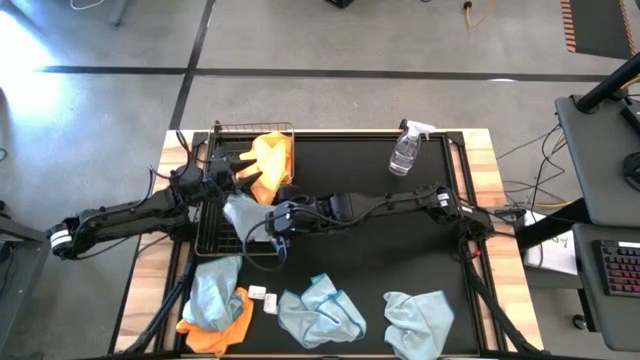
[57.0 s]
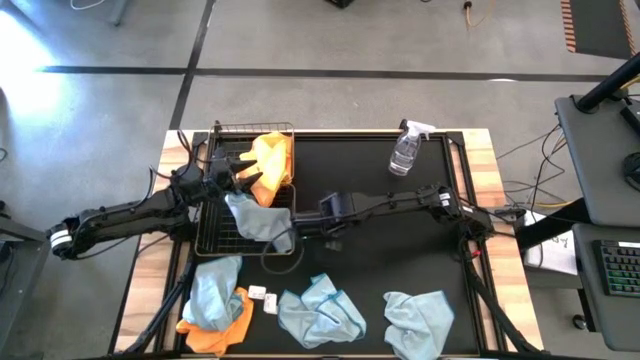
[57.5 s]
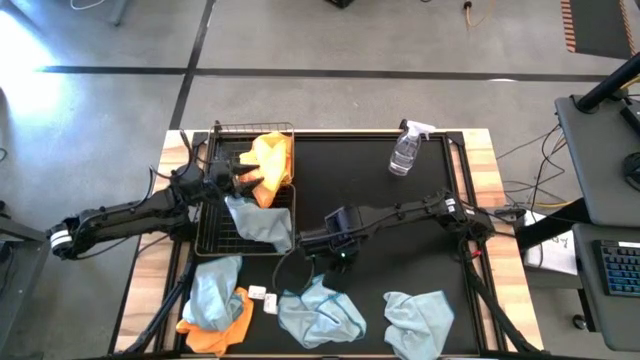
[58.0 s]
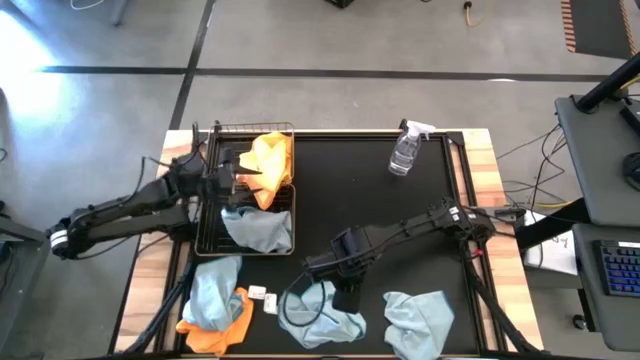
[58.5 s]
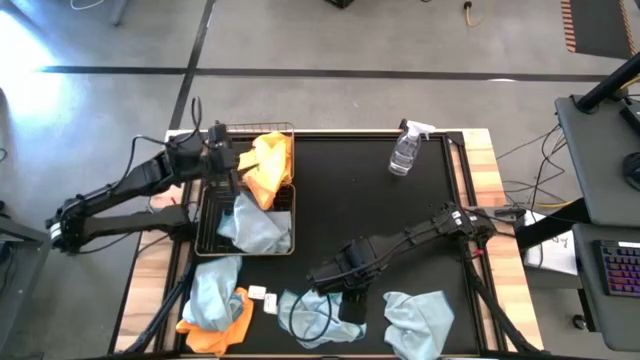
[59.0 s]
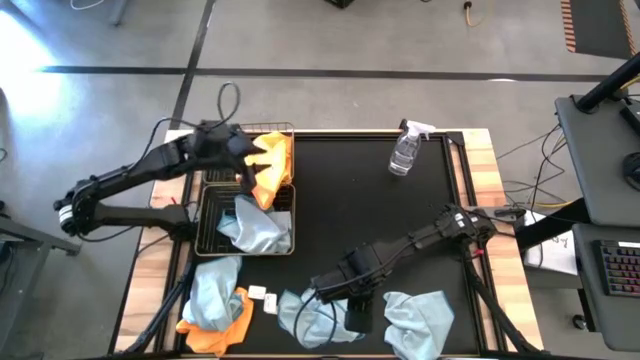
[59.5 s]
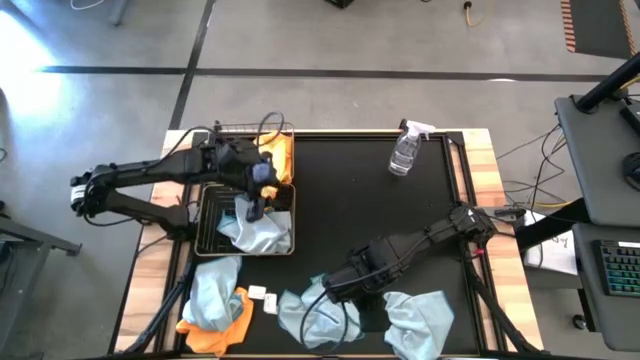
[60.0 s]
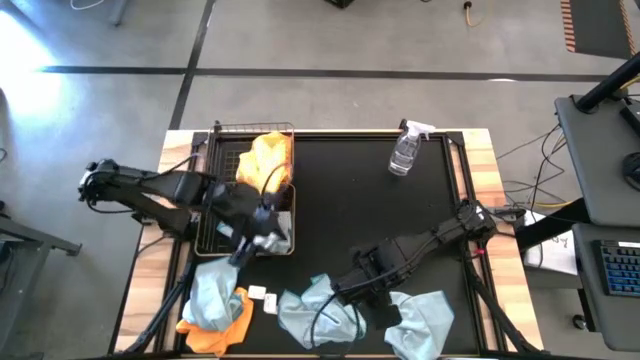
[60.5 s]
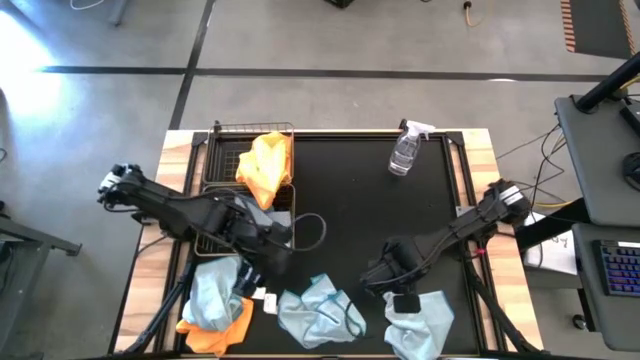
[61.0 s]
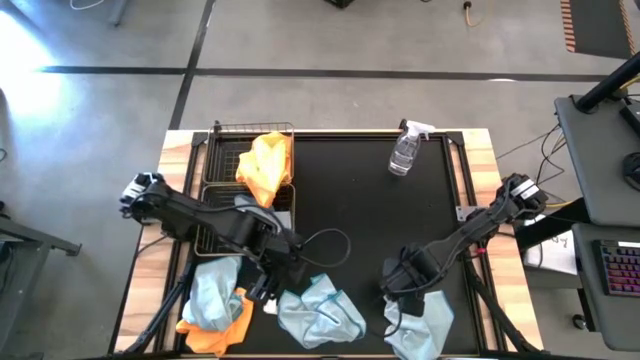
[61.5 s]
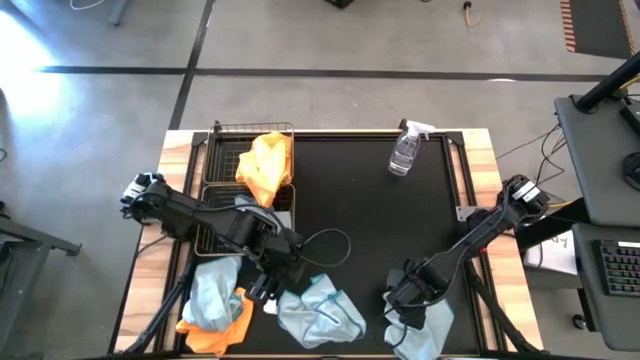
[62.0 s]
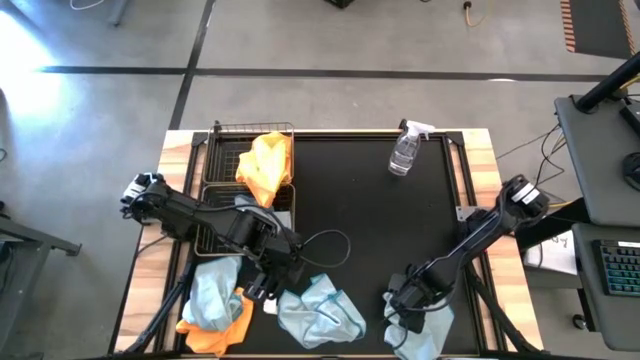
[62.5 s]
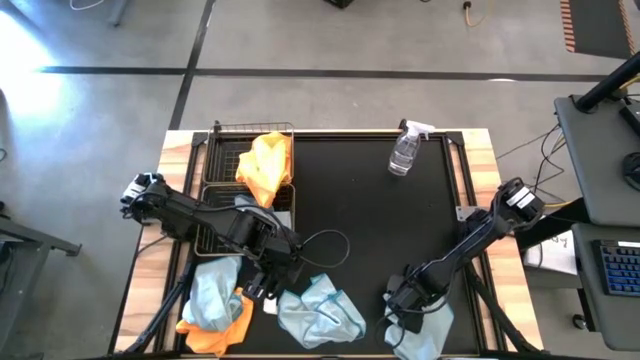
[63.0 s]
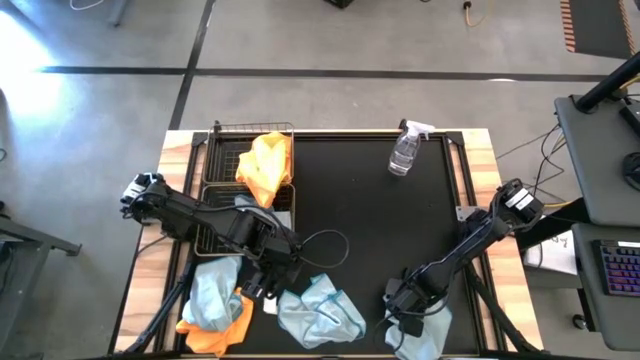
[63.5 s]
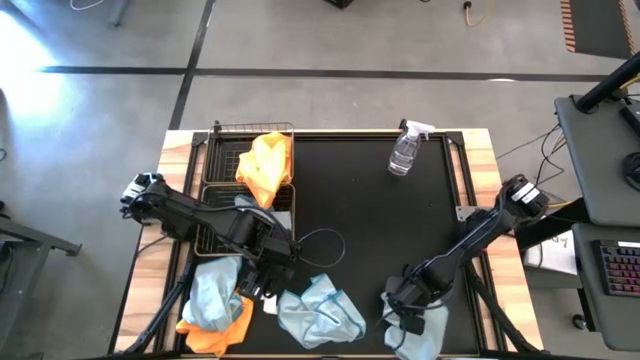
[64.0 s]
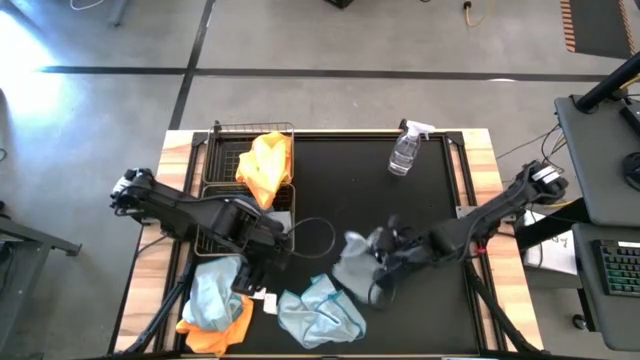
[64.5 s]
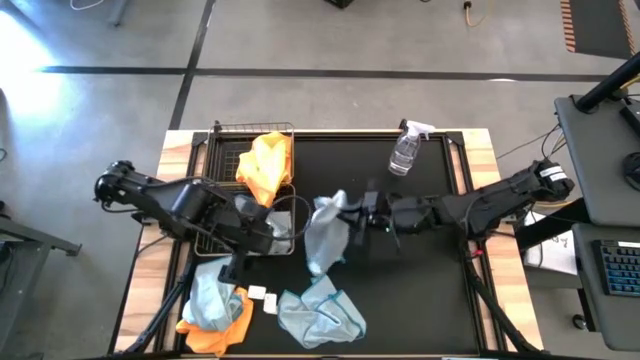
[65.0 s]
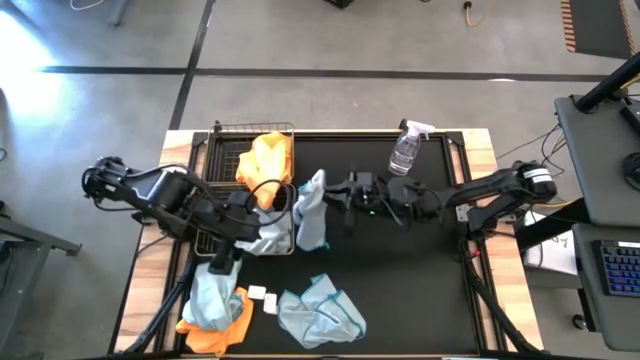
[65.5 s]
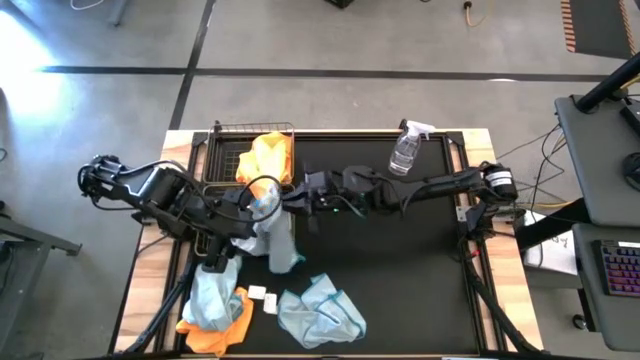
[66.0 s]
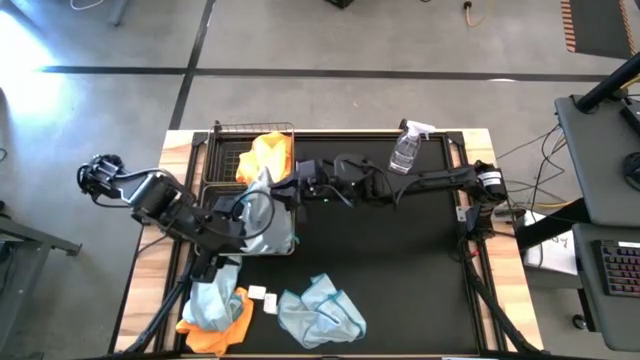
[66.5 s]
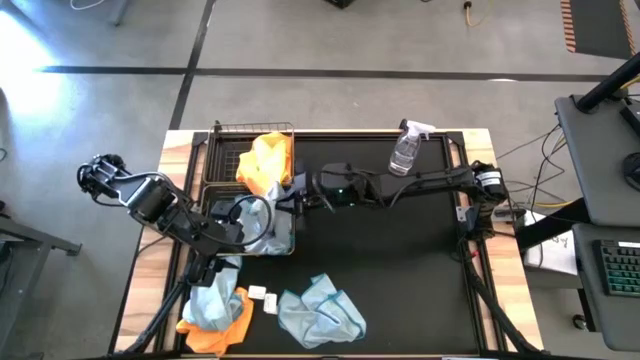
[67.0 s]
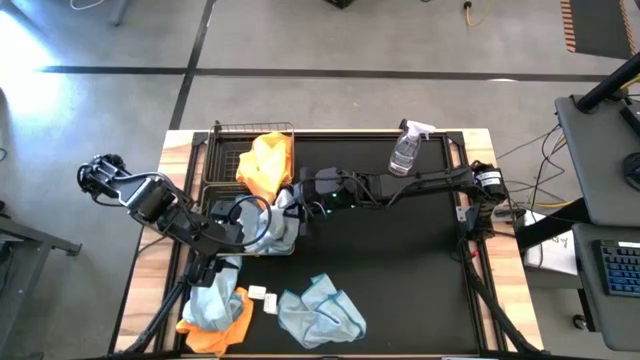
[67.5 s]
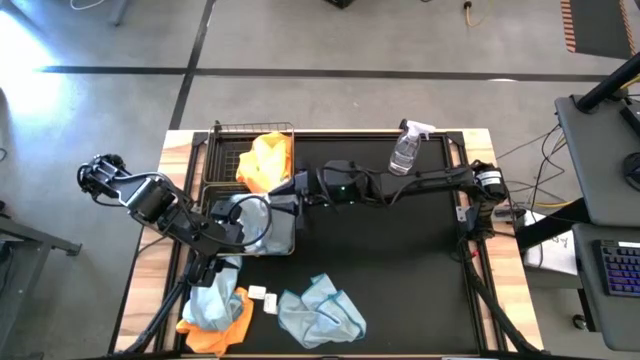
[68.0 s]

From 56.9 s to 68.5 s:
Task: Sort microfiber towel by color & place in baskets
Put the right blue microfiber towel into the bottom wire basket

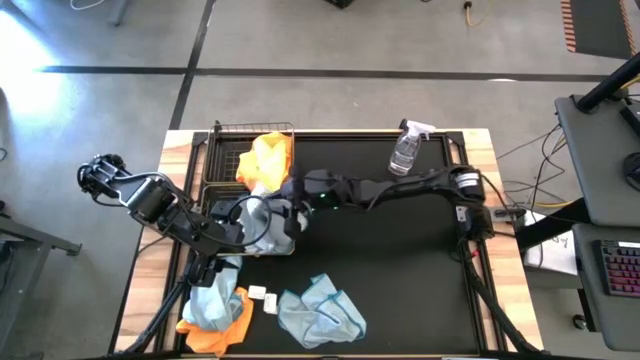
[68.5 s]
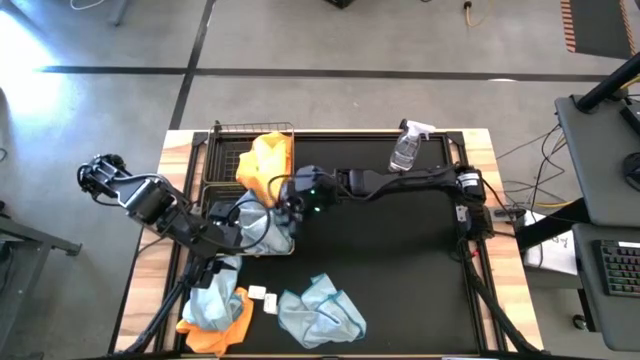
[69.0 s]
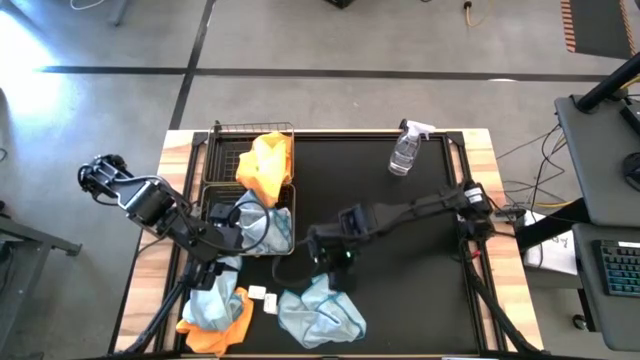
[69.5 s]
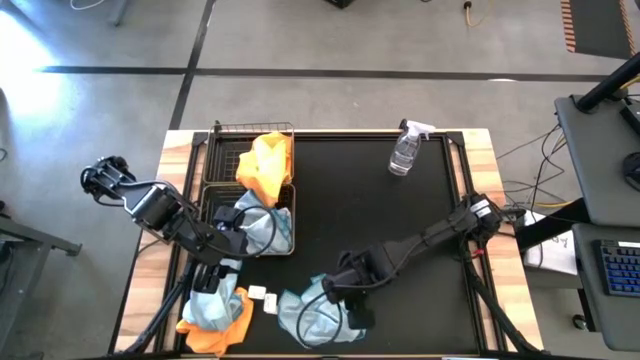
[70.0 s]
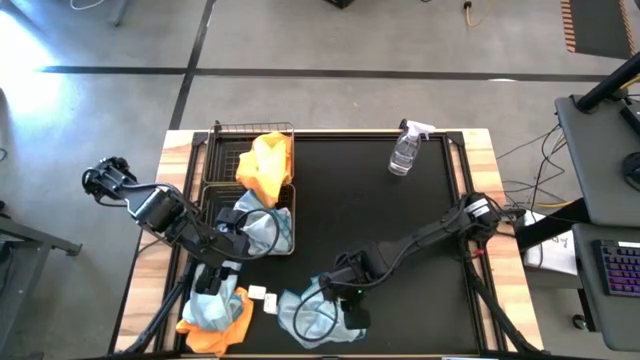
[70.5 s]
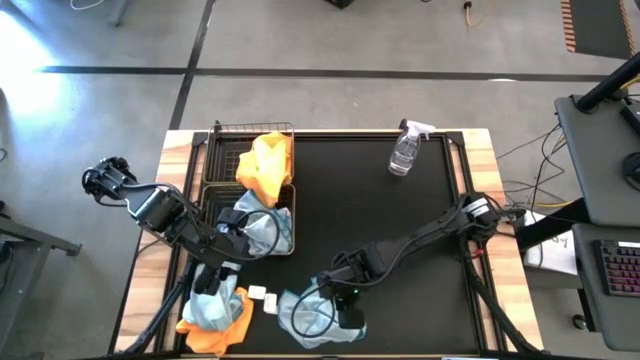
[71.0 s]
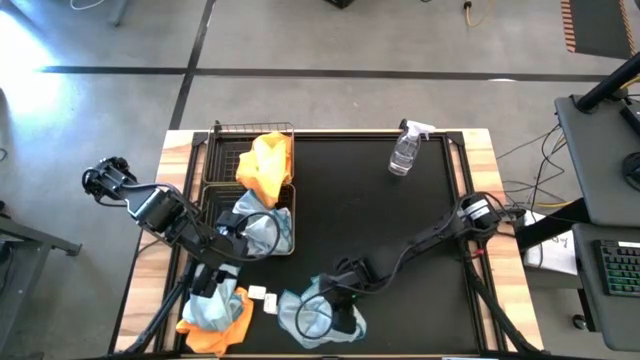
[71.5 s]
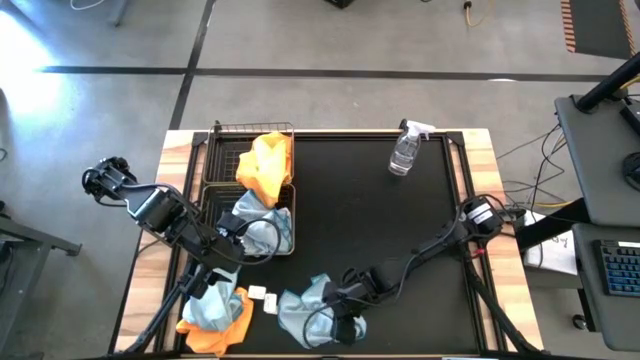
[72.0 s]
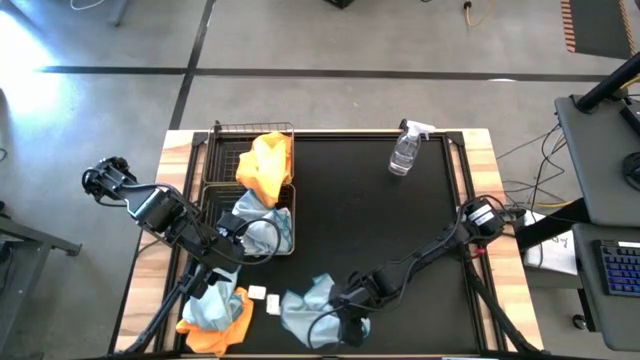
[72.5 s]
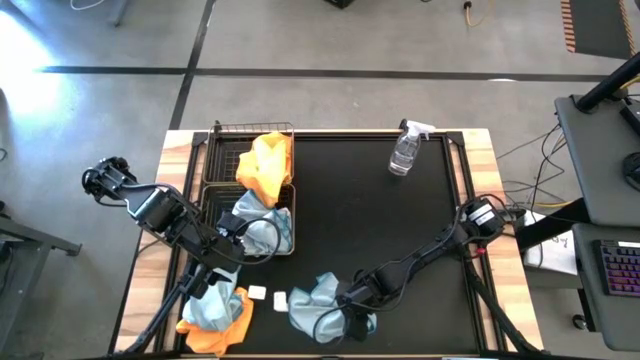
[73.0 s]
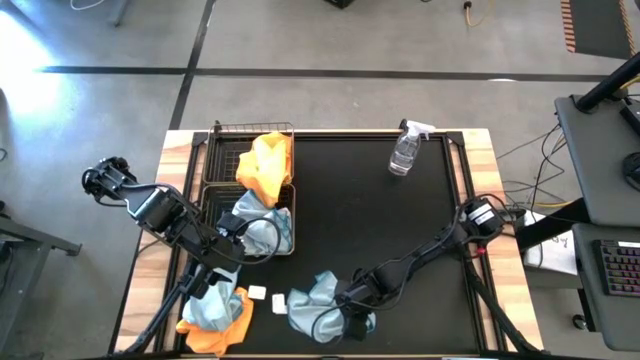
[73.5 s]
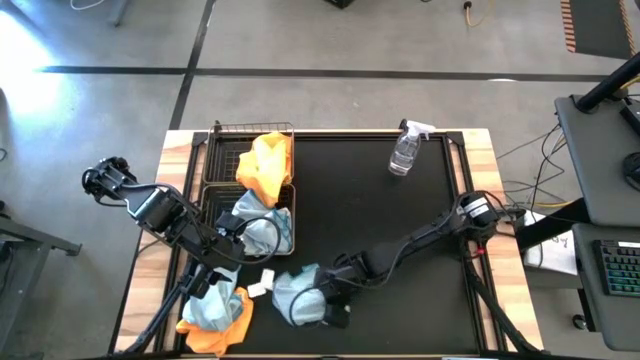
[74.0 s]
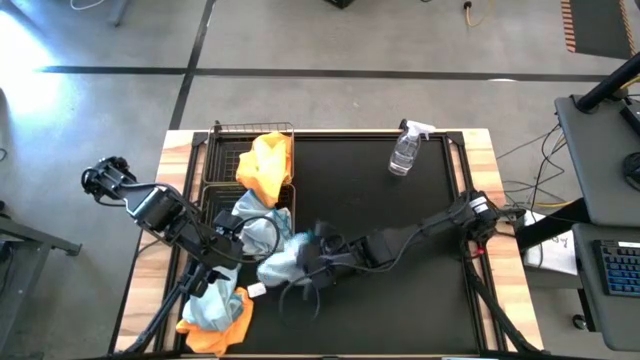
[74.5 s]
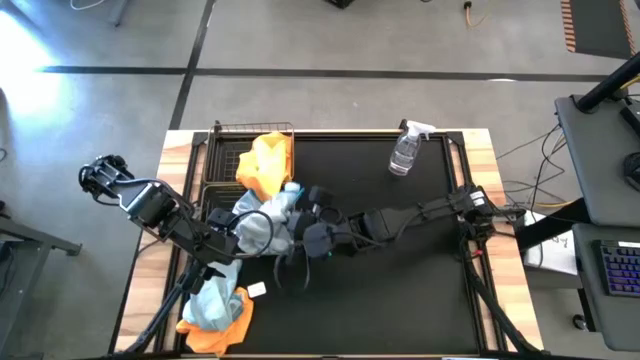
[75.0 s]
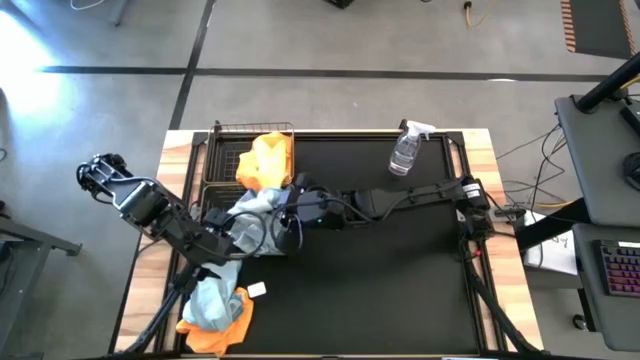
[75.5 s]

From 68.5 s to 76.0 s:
Put the right blue microfiber towel into the bottom wire basket

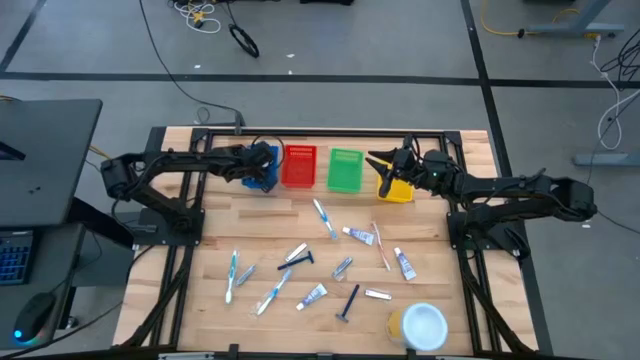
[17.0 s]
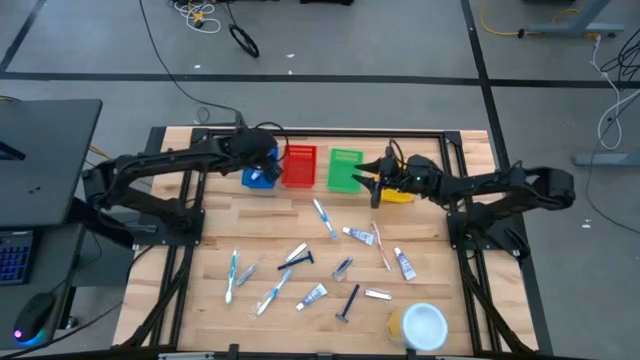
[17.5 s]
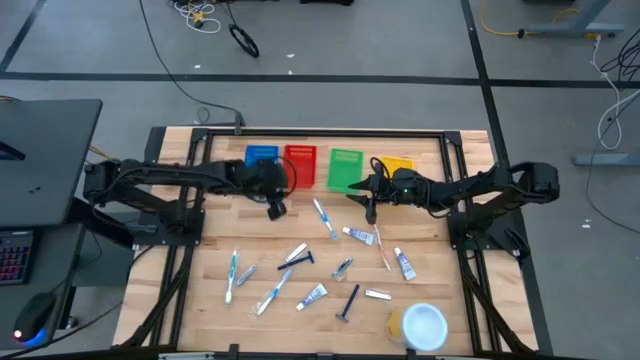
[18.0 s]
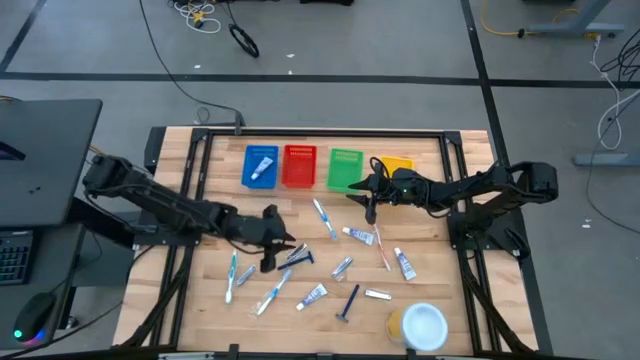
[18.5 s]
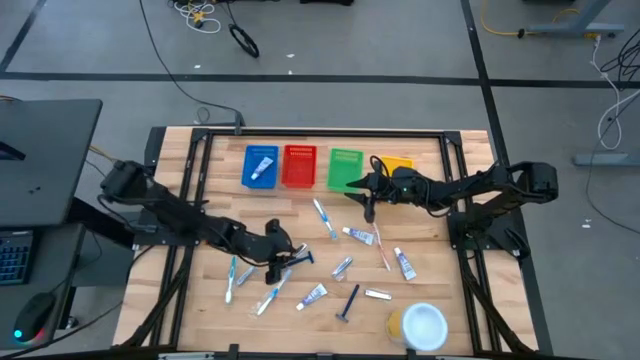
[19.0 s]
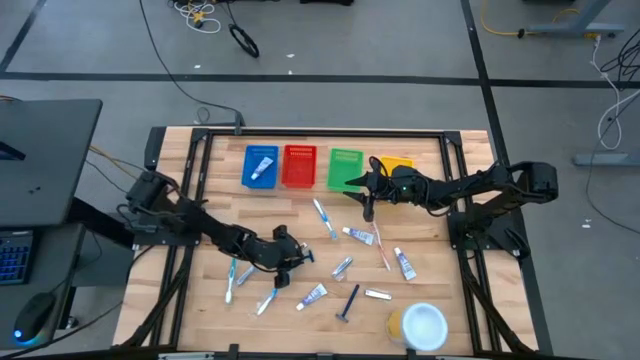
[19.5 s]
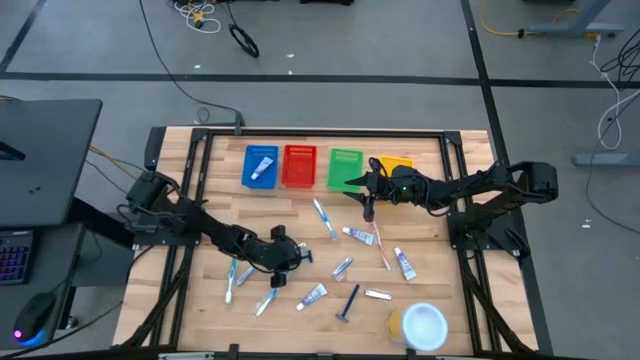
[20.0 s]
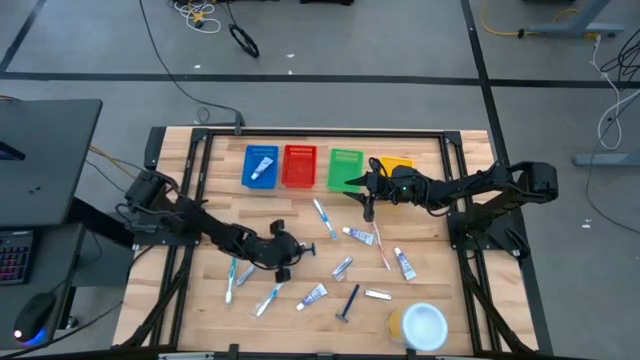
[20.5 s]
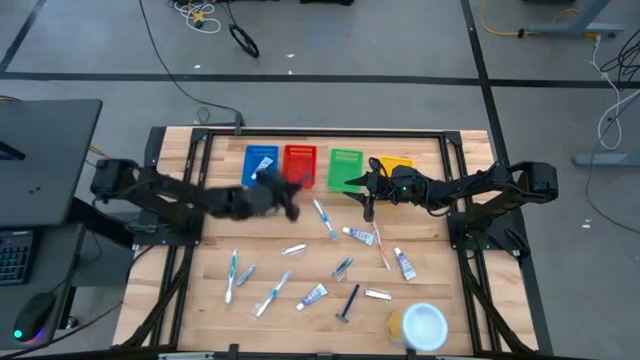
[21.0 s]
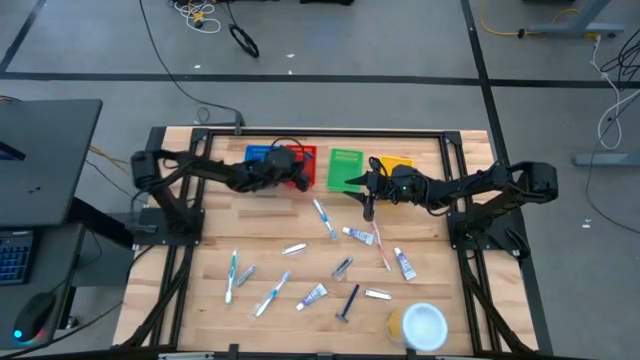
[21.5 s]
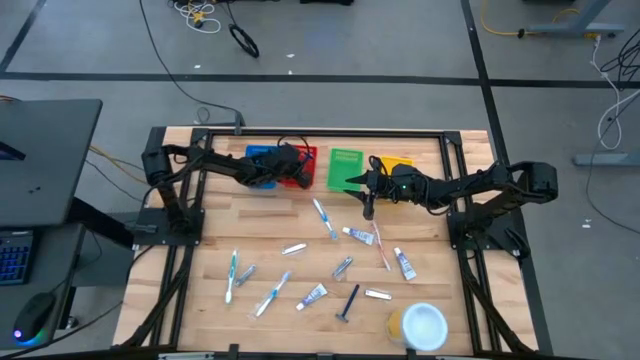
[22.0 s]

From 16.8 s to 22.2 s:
Task: Pick & Place Travel size toiletries
Put the blue razor into the orange bin
